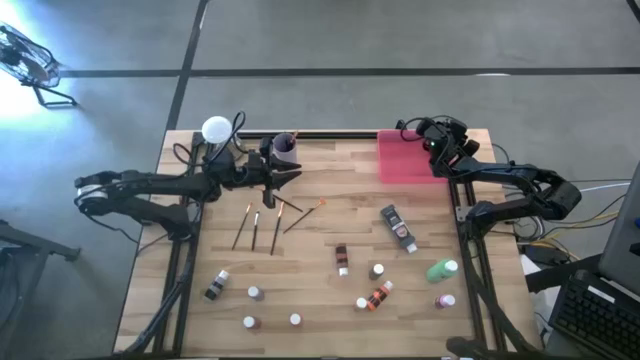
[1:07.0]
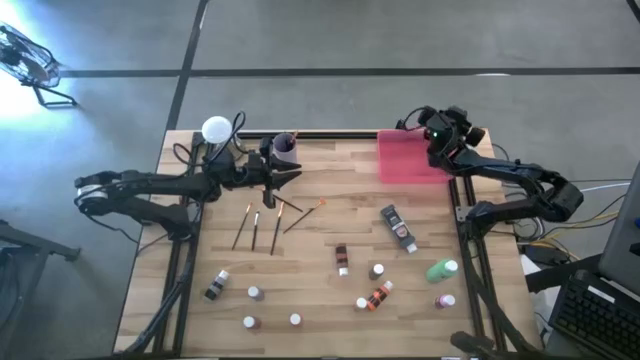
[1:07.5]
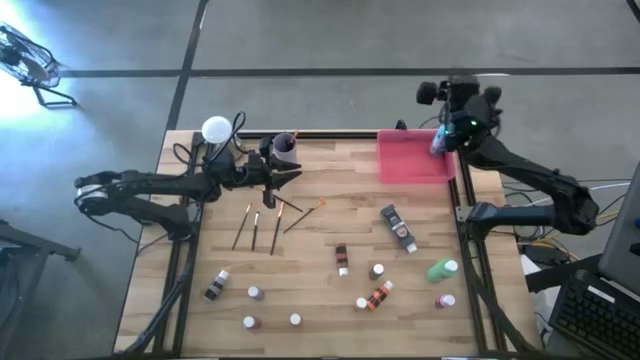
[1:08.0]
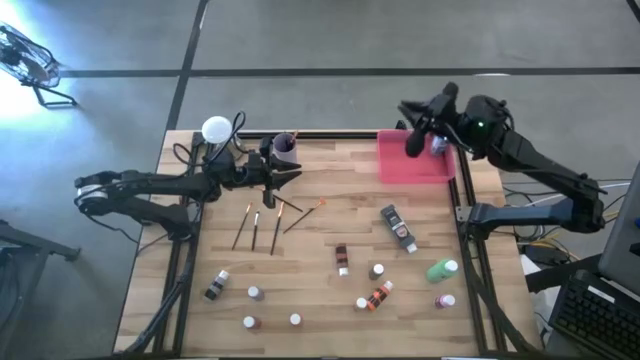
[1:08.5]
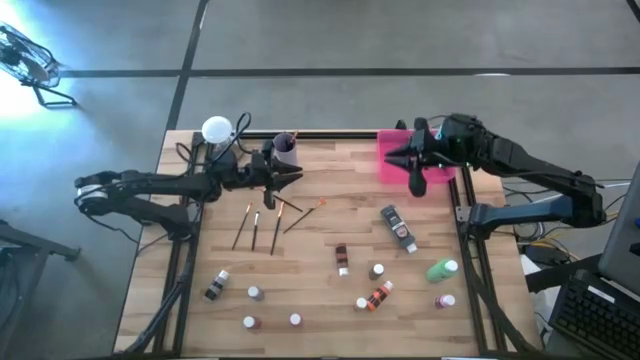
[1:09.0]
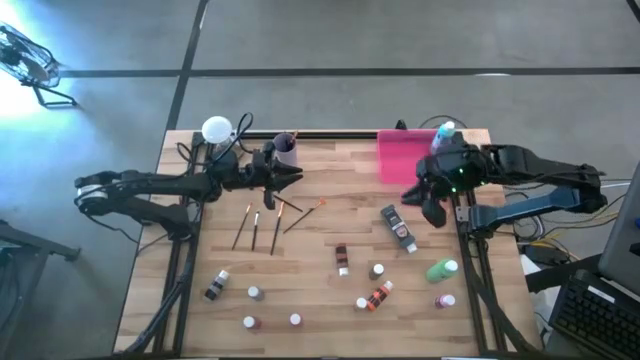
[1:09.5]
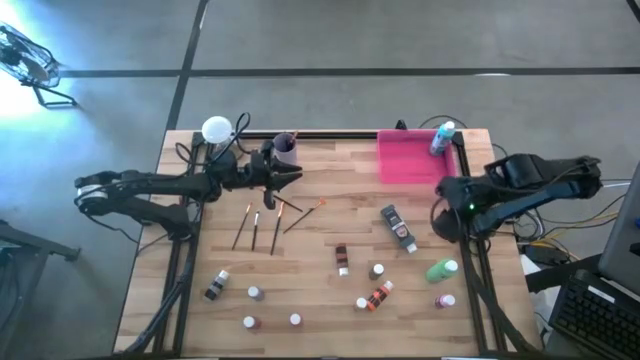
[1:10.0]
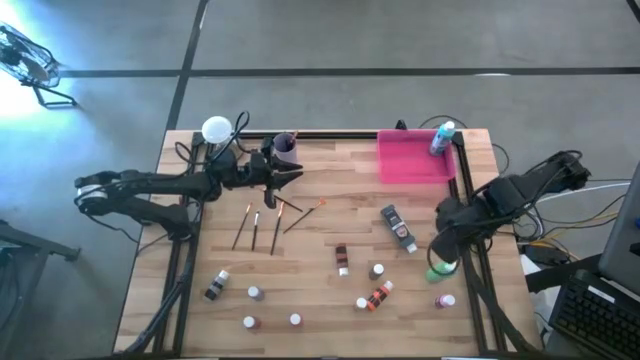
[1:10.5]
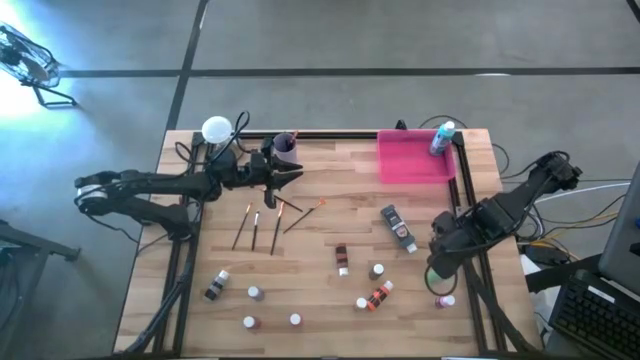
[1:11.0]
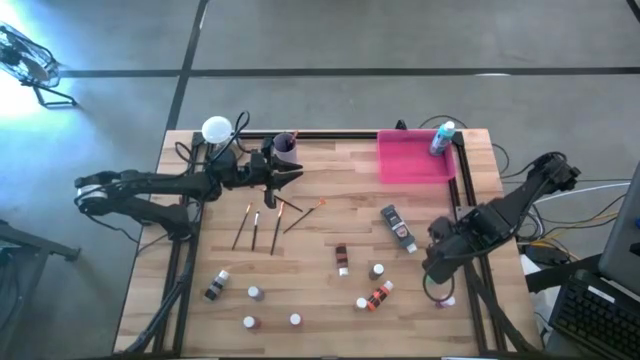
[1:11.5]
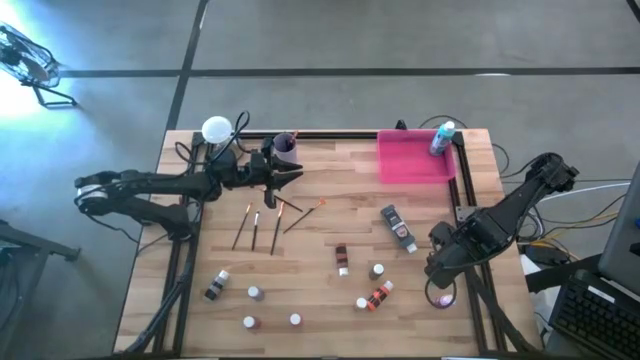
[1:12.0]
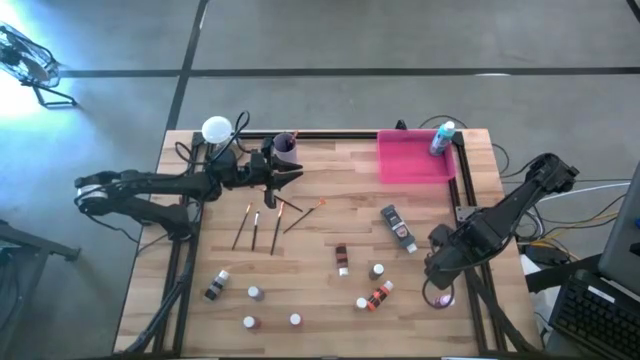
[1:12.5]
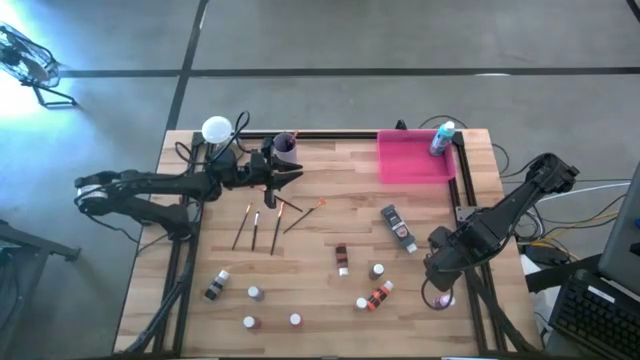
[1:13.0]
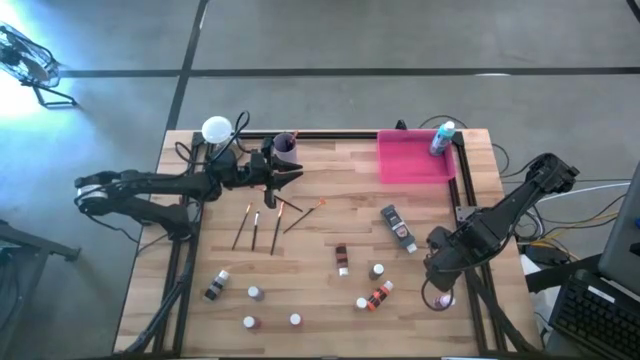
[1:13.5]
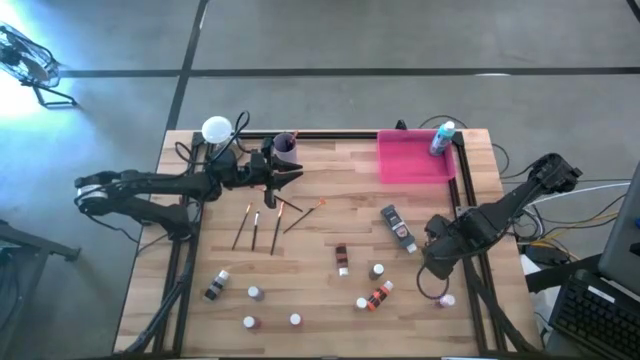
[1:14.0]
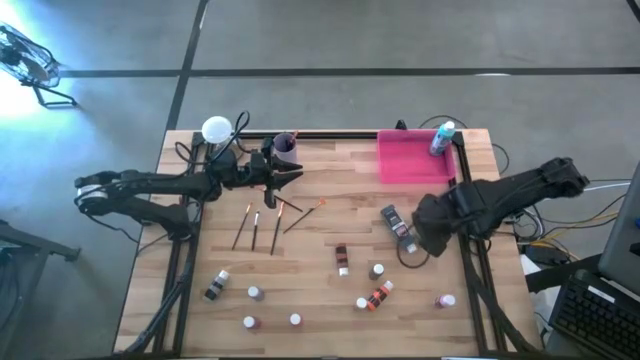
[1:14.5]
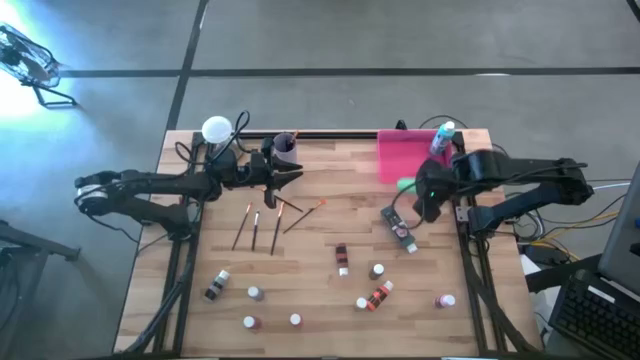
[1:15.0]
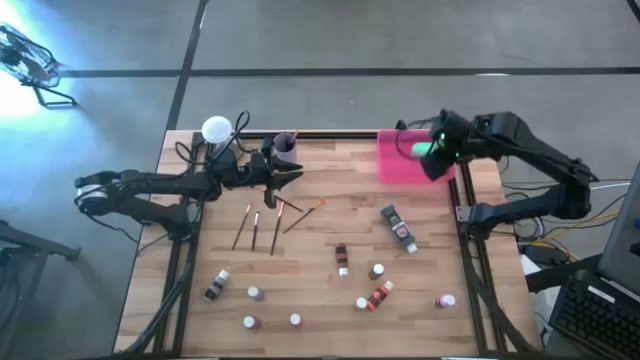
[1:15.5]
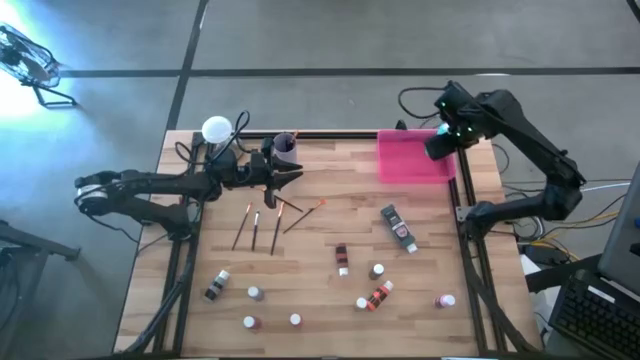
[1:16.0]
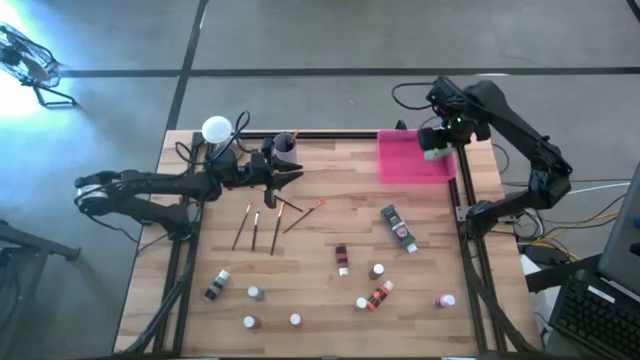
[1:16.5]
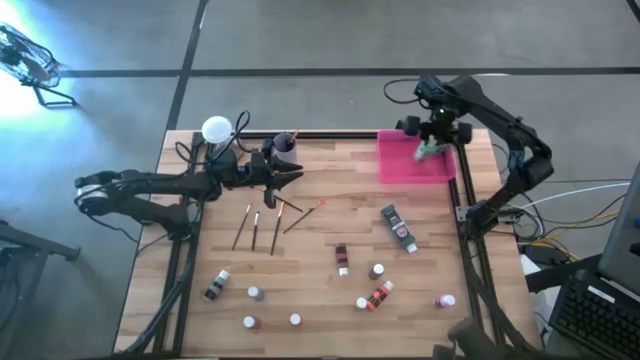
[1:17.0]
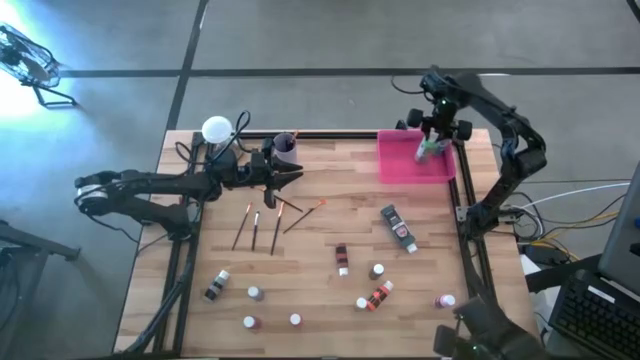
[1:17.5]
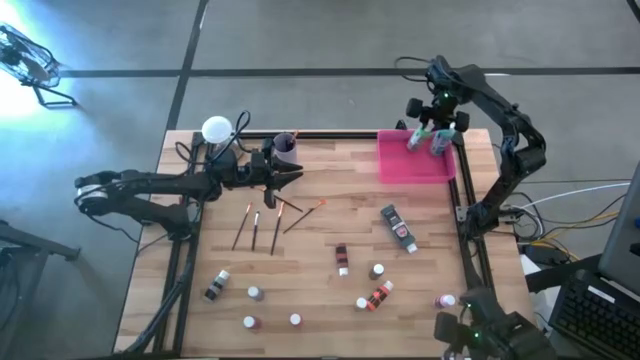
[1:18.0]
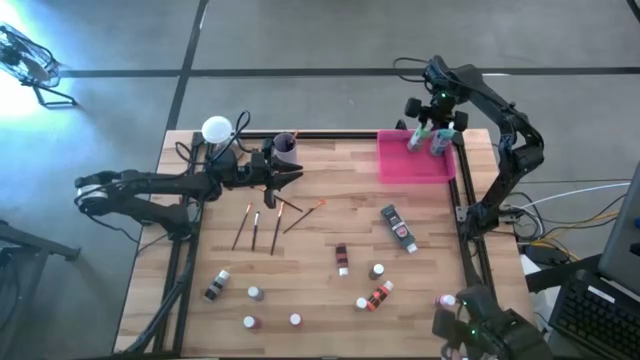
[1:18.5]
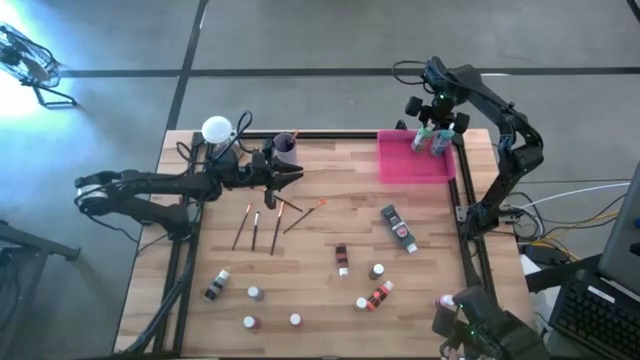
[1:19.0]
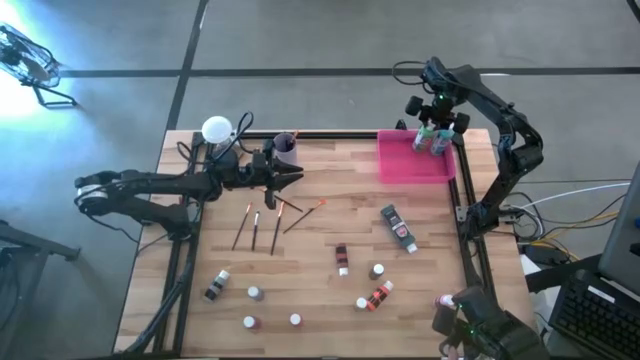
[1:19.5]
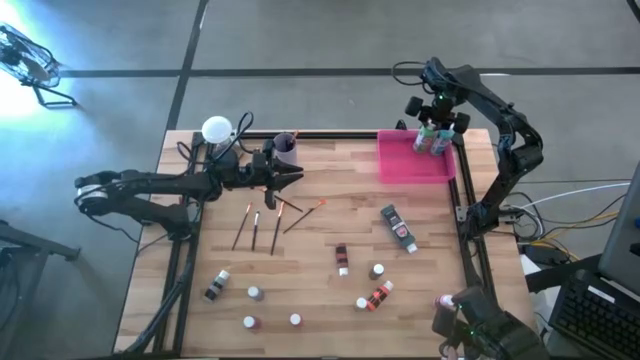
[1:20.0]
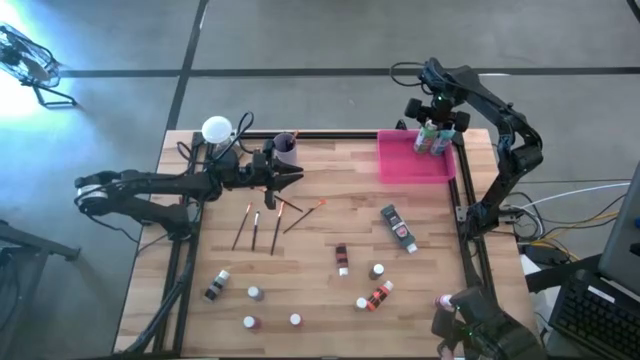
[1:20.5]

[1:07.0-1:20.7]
Task: Pick & Place Paint Supplies
Put the large green paint bottle into the pink bin

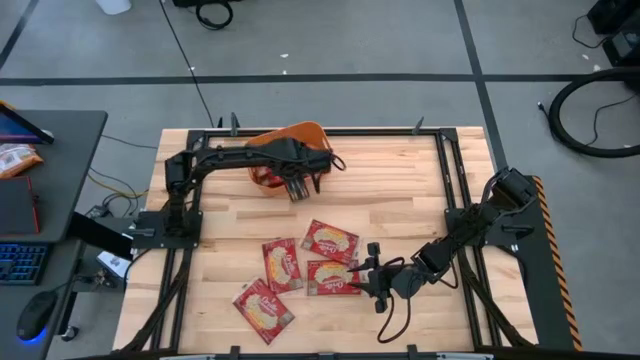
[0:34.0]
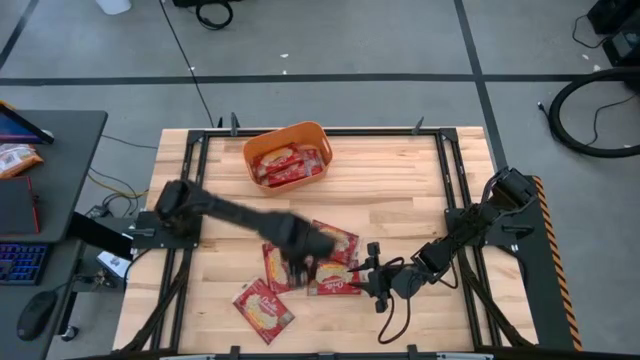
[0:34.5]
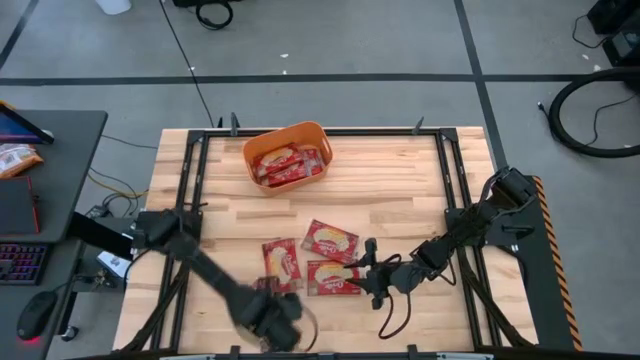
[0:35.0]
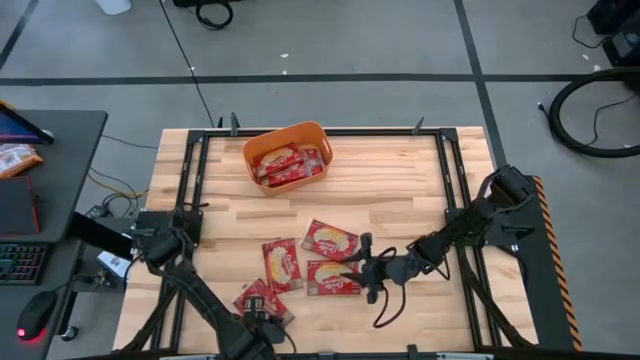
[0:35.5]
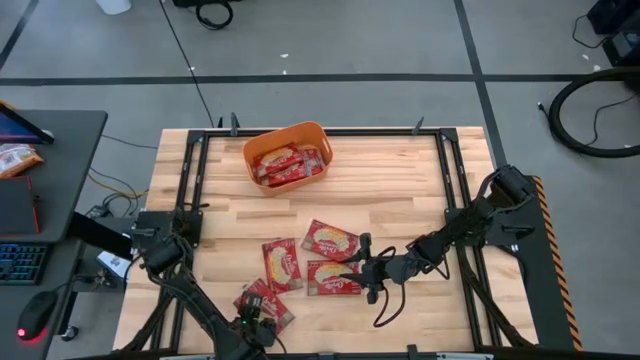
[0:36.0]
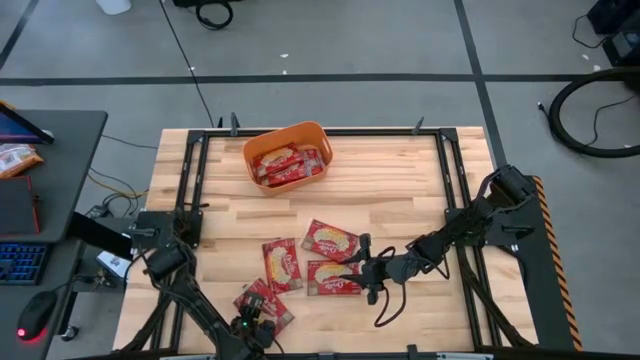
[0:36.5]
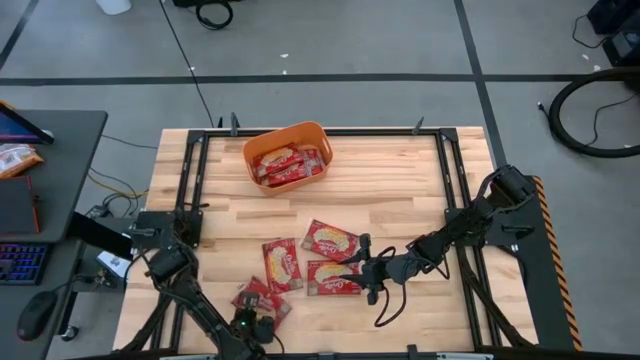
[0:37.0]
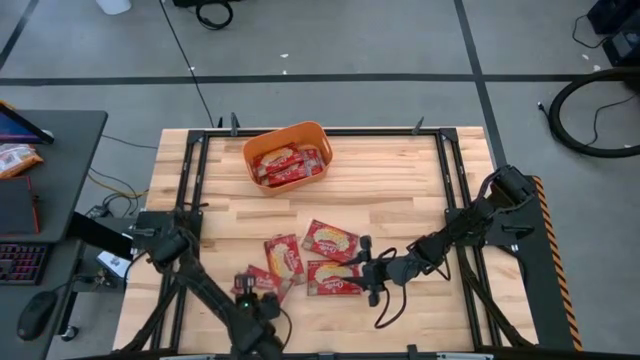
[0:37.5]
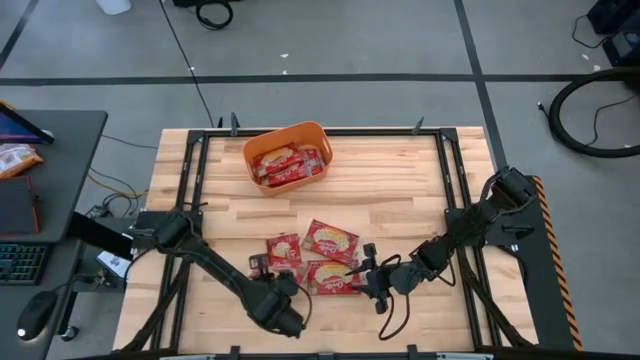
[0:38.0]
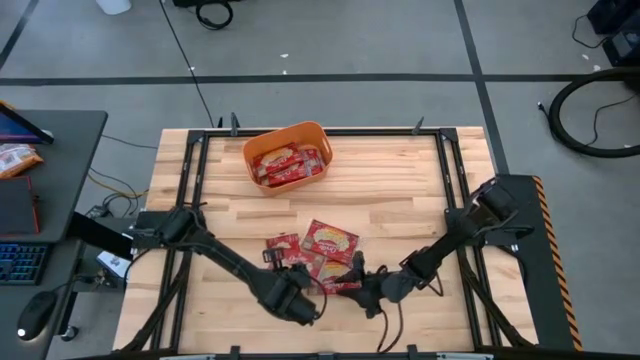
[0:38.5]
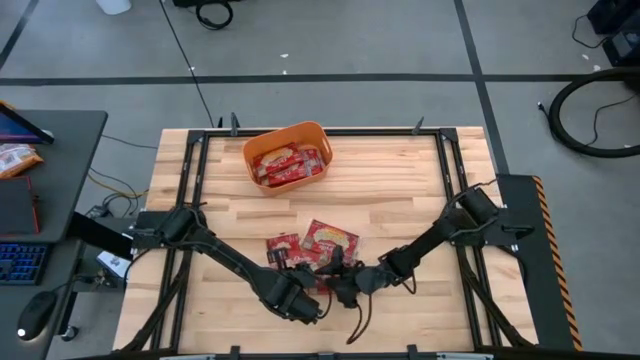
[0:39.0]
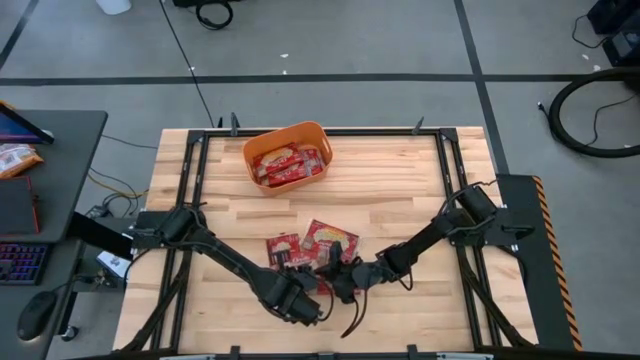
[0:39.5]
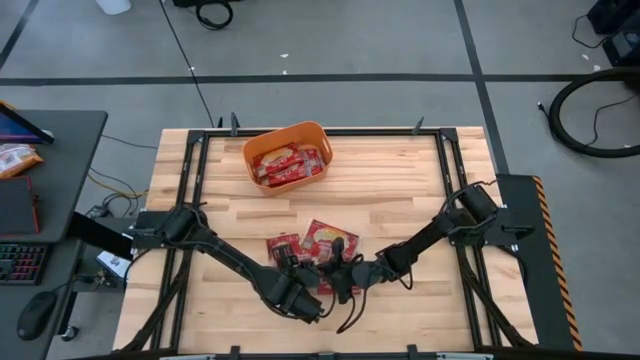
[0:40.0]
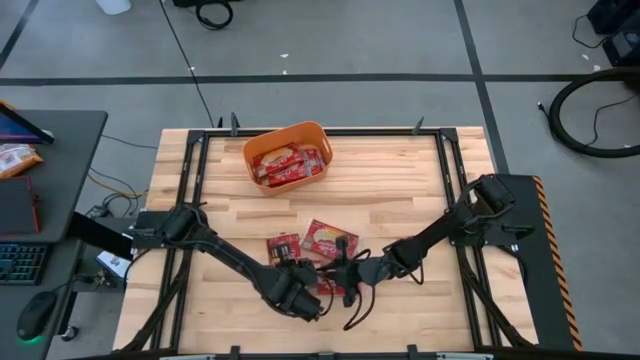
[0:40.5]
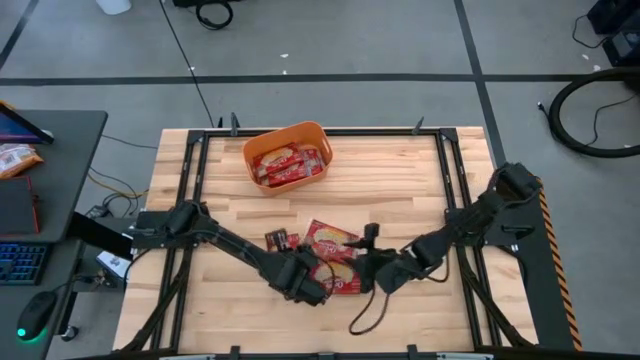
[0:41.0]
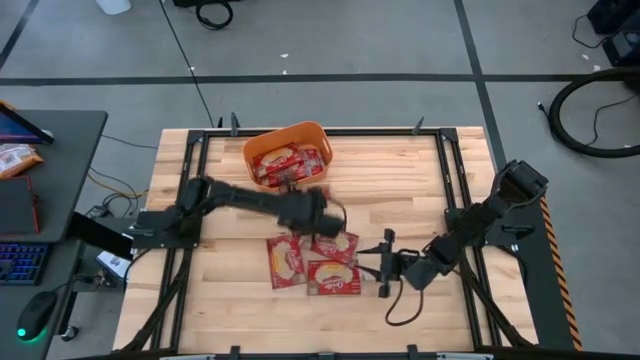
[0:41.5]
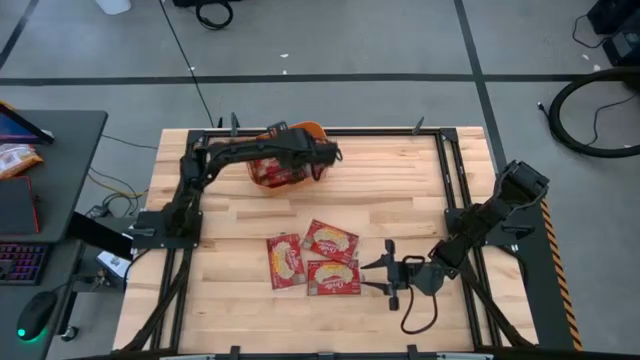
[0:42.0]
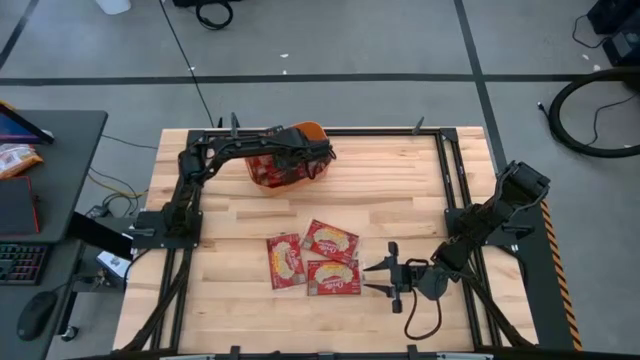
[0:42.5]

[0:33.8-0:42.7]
Task: Sort popcorn bags into baskets
Put the red popcorn bag into the orange bin
